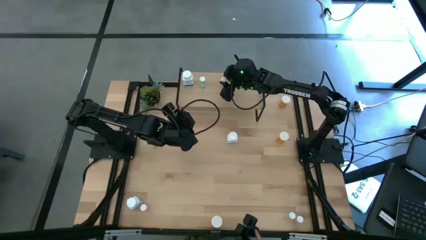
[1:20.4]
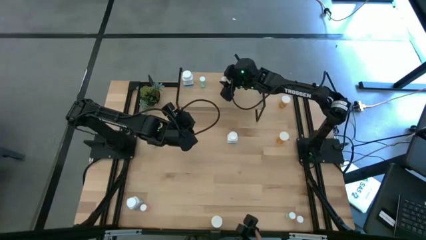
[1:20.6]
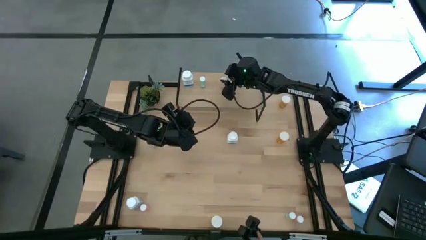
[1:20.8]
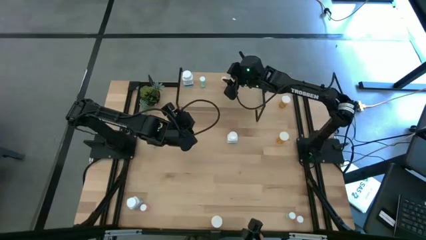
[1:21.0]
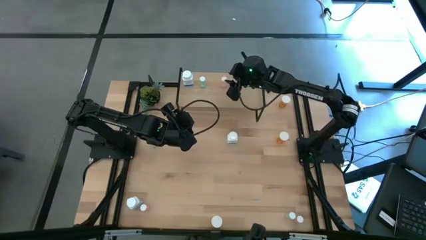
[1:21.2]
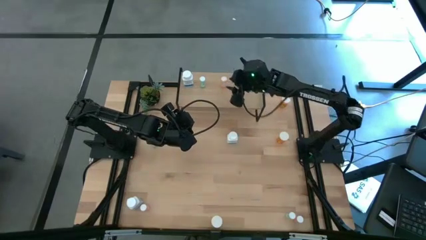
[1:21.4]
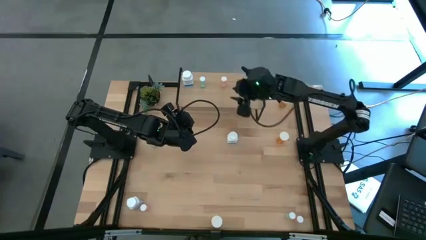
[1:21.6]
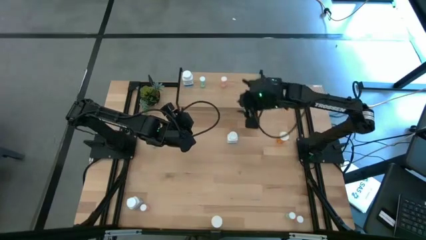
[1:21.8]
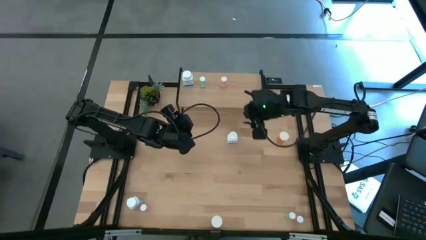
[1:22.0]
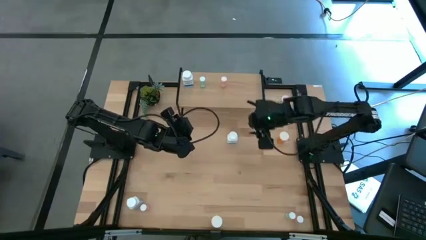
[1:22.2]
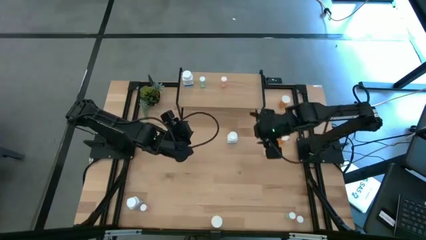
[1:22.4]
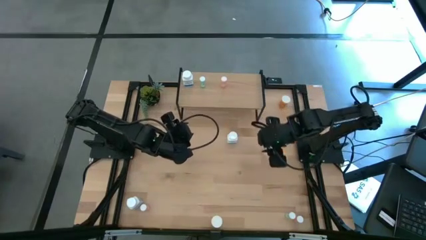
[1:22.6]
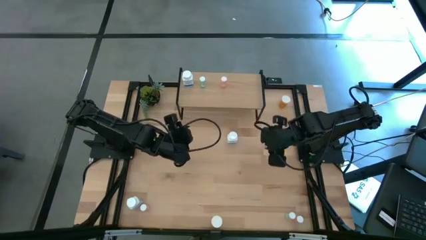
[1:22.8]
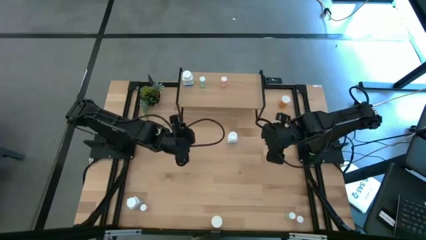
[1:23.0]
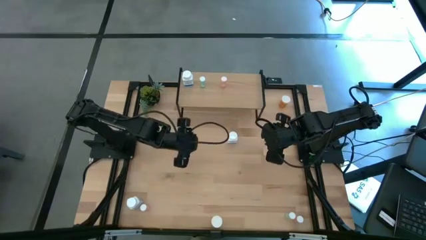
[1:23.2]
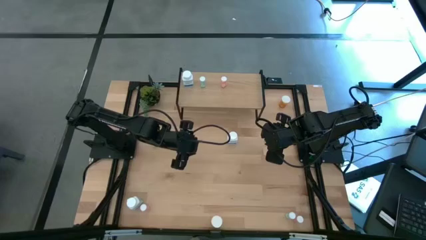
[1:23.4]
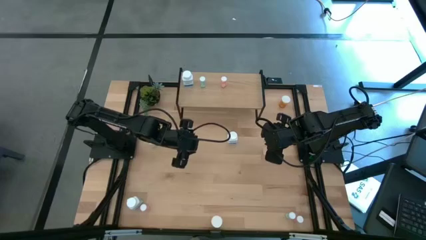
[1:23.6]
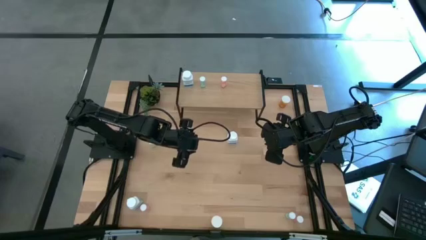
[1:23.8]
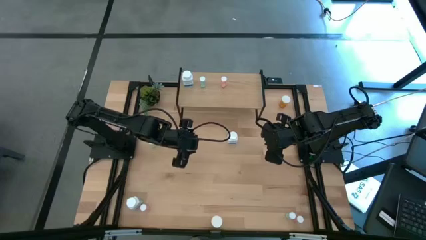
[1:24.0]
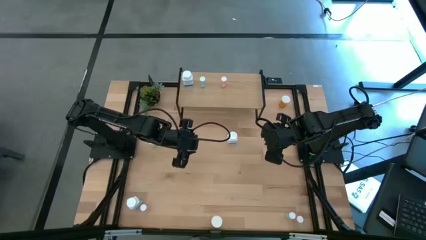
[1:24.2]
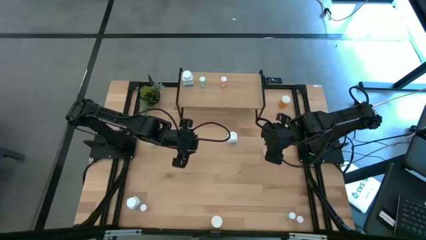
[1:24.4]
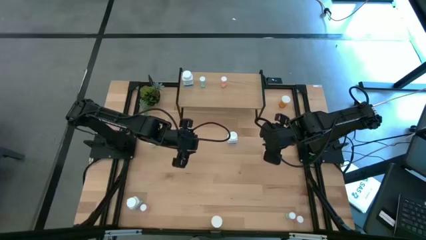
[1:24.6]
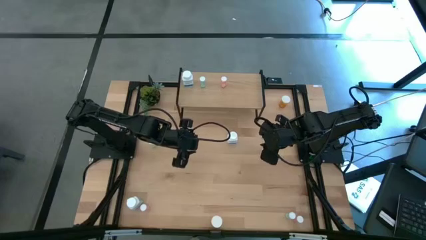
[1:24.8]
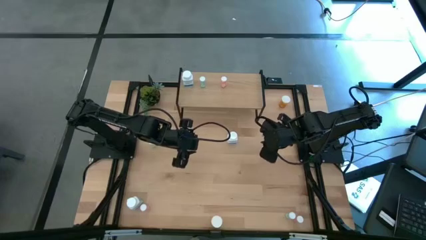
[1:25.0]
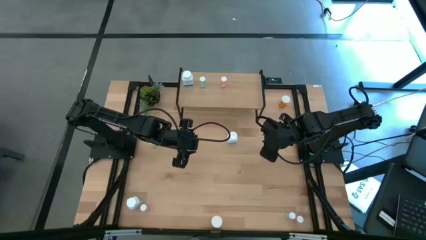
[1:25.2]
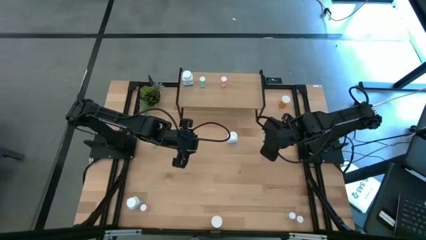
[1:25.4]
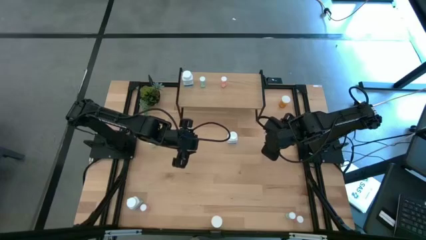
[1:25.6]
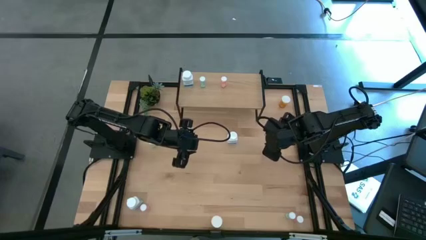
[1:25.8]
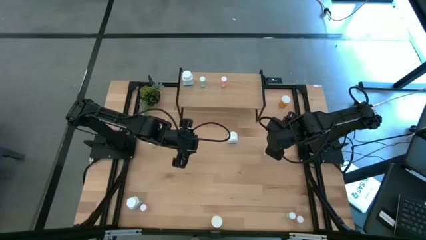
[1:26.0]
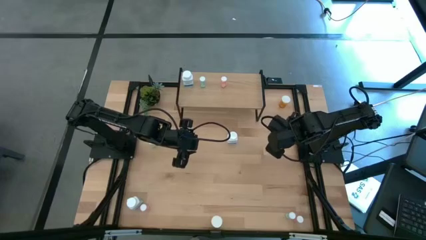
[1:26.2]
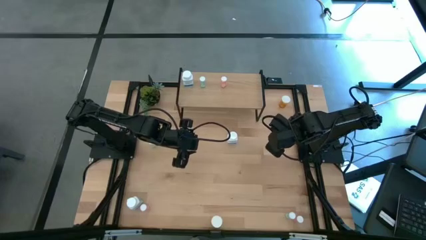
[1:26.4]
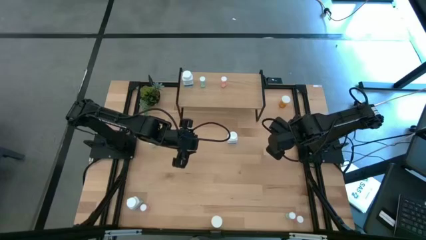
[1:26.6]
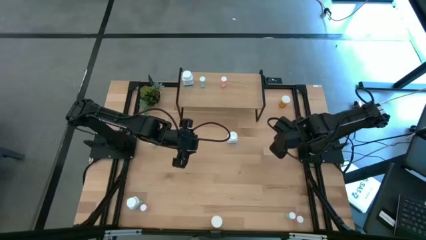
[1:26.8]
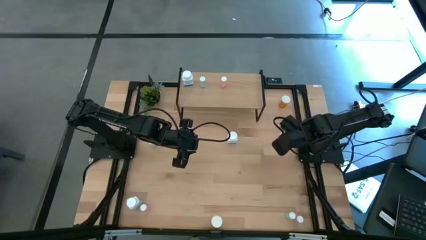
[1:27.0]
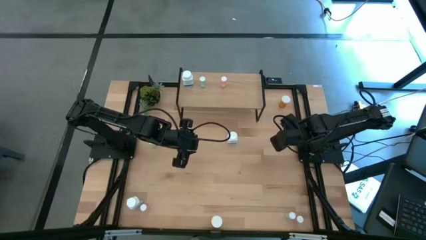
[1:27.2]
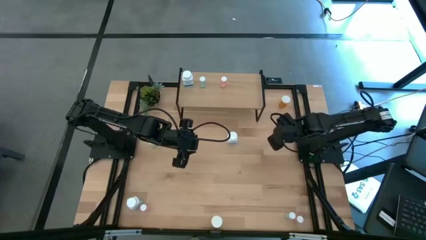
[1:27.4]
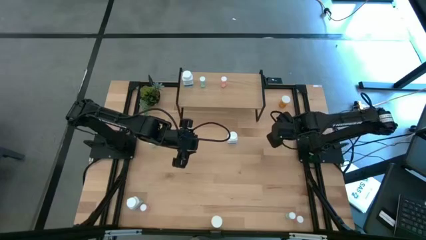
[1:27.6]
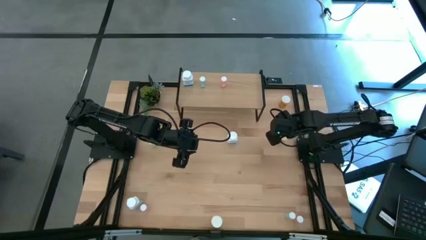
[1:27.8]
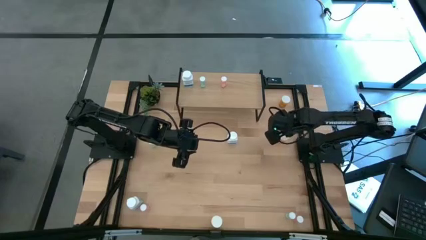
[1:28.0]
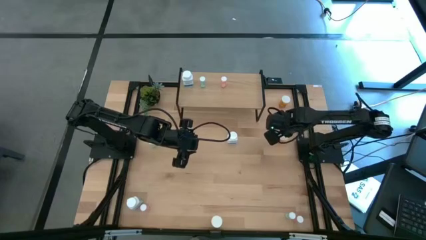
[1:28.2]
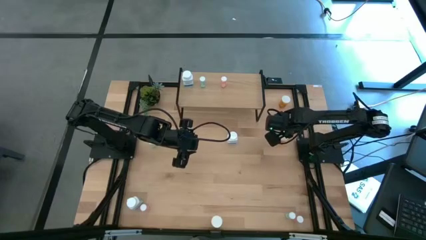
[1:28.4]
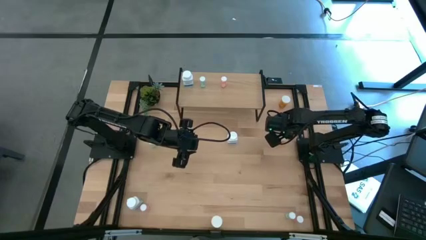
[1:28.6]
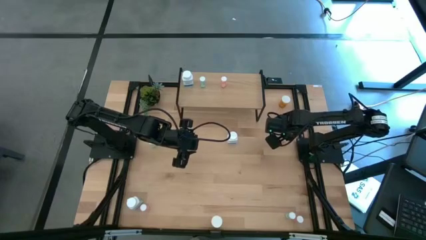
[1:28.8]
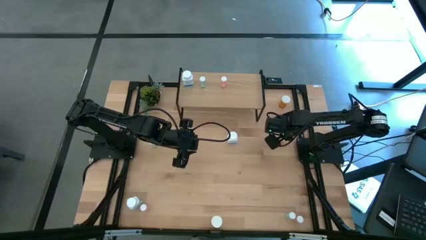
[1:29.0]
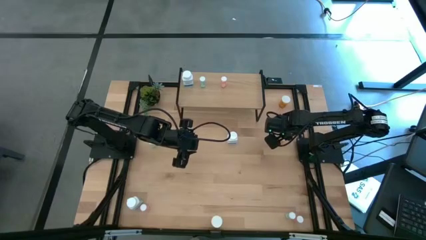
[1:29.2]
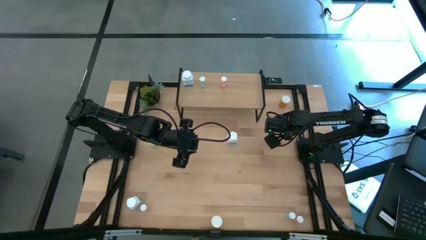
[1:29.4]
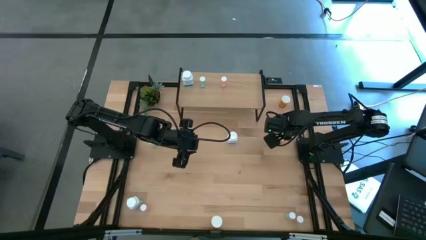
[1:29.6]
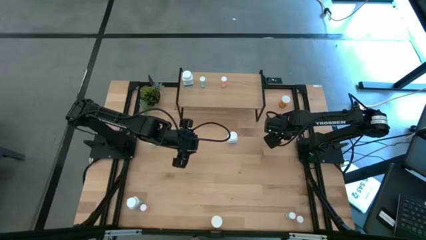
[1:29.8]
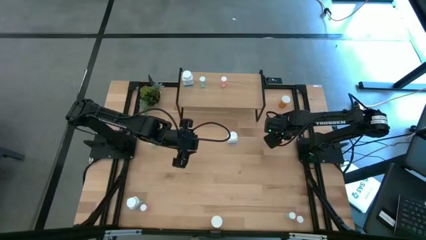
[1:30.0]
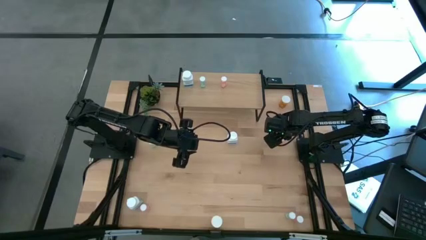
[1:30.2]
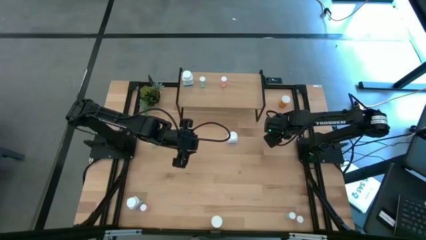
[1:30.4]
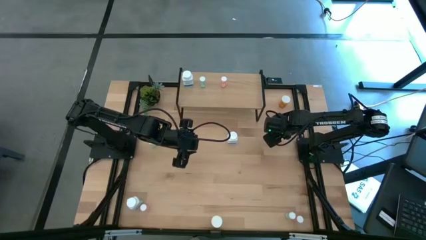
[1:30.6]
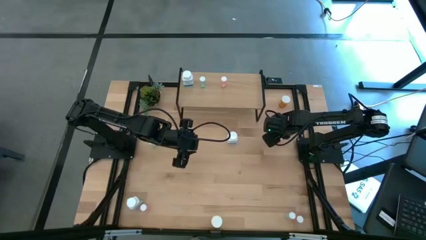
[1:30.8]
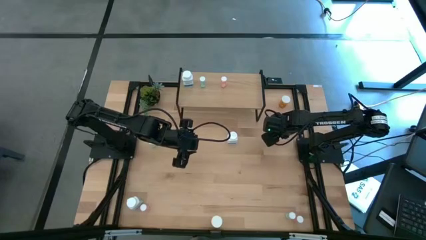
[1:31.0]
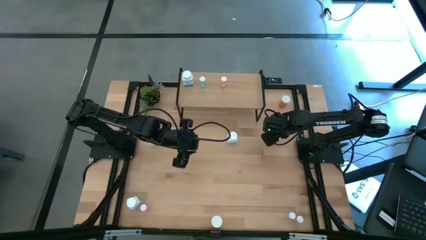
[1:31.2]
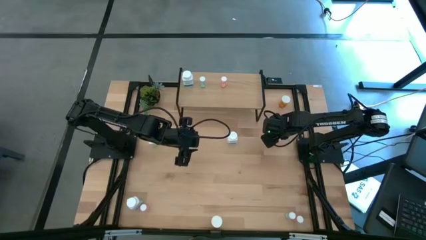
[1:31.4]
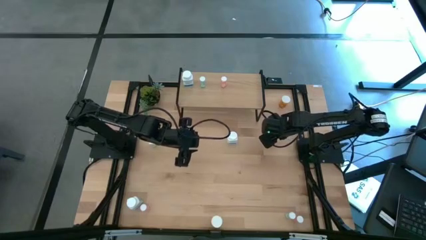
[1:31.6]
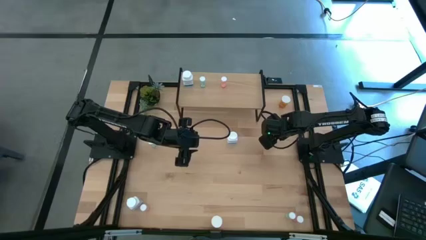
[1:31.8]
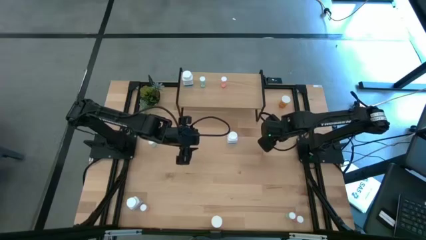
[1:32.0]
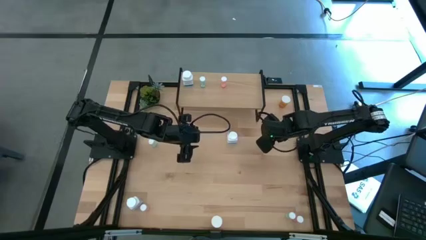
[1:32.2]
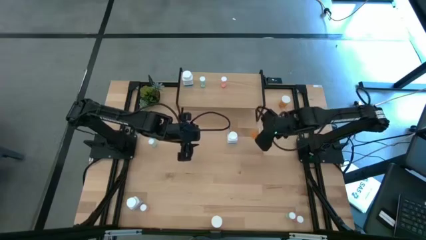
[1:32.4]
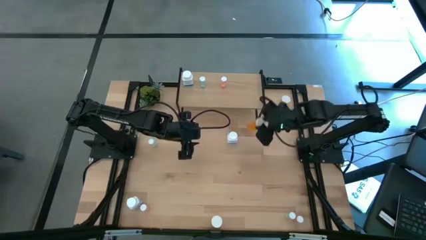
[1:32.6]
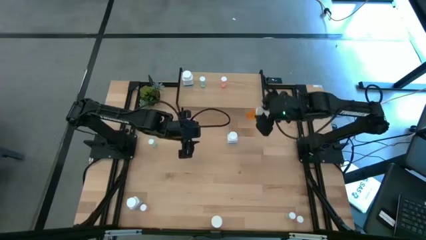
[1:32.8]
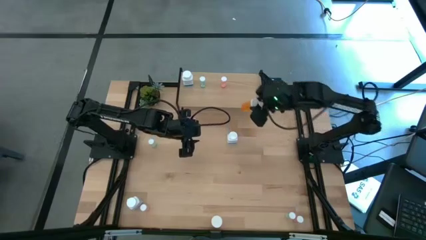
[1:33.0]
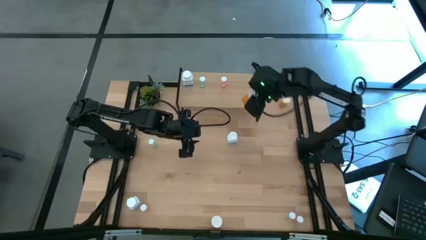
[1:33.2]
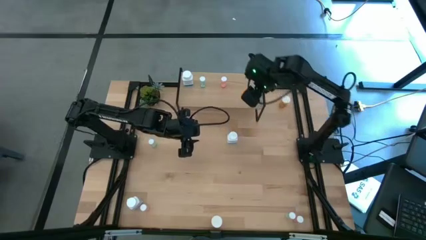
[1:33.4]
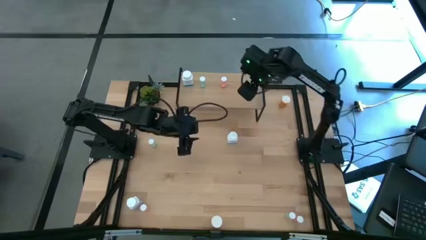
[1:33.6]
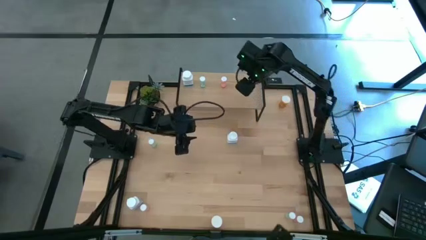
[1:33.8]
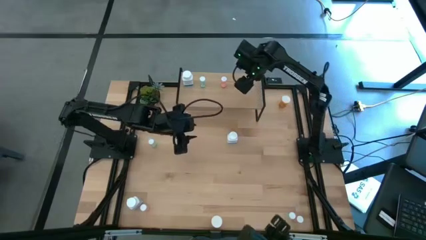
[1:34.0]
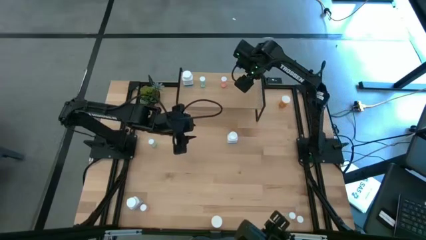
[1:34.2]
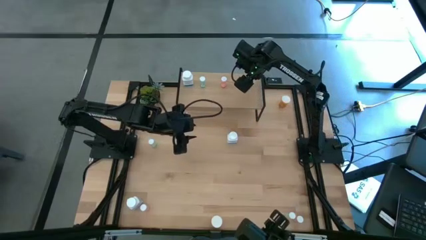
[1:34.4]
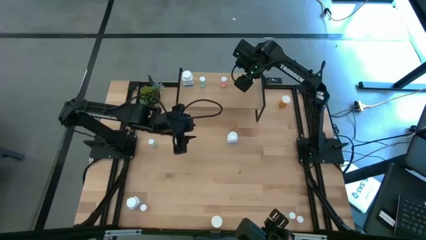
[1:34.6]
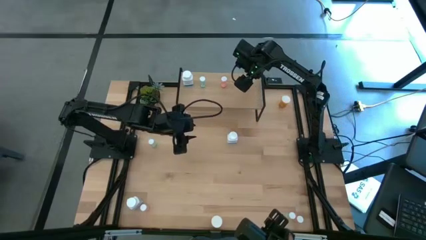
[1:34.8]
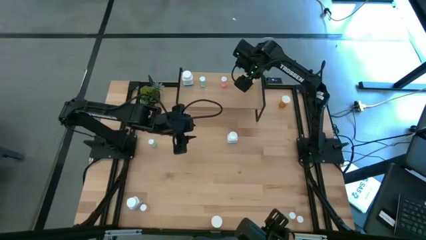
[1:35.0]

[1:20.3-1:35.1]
Task: Pick and place medicine bottles onto shelf by color
Put the middle right orange pill bottle on the shelf
